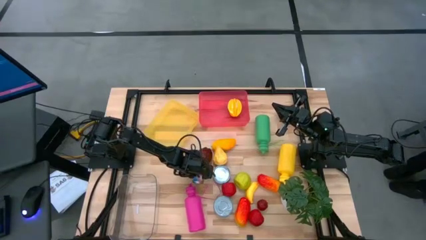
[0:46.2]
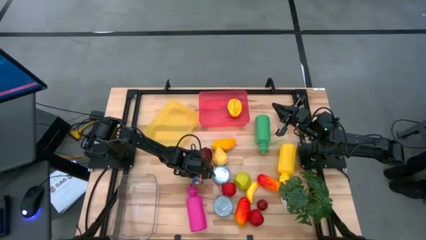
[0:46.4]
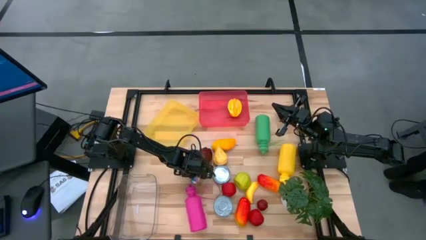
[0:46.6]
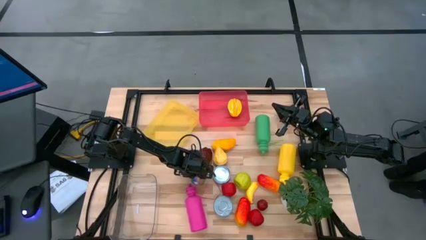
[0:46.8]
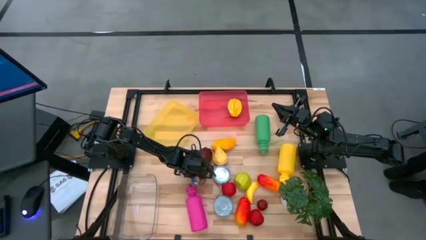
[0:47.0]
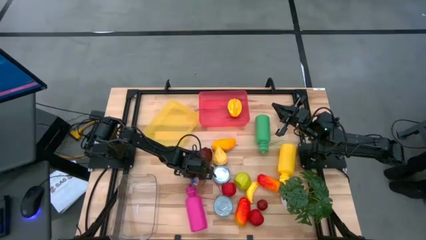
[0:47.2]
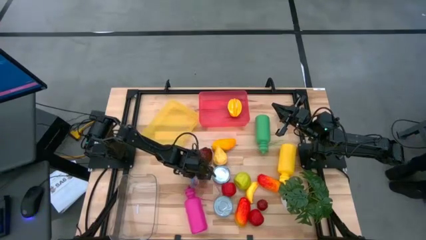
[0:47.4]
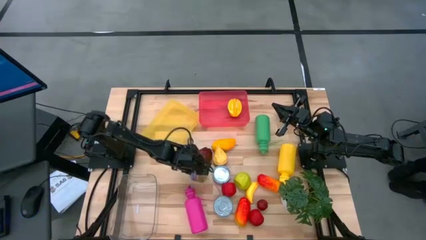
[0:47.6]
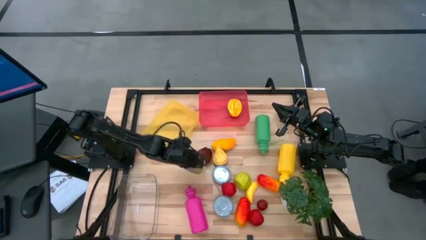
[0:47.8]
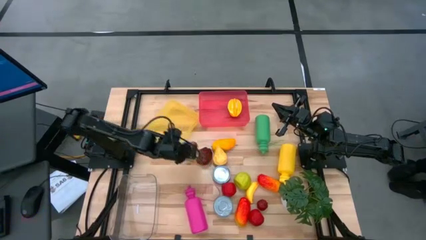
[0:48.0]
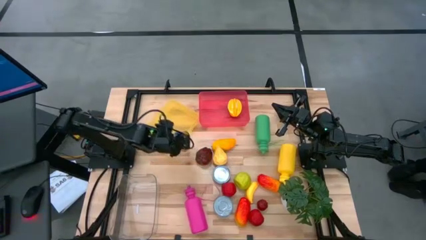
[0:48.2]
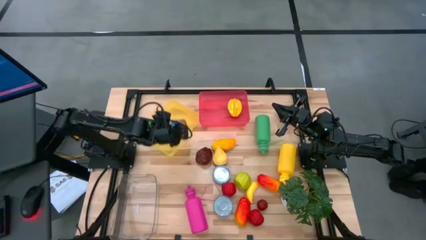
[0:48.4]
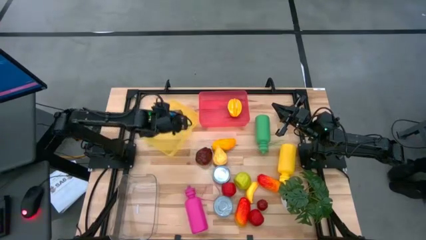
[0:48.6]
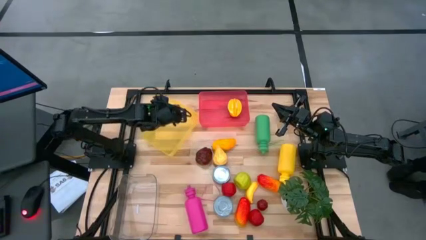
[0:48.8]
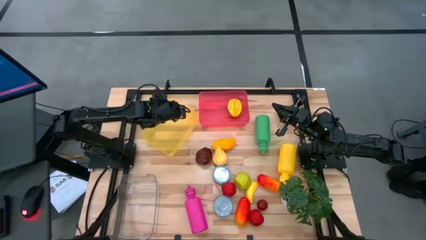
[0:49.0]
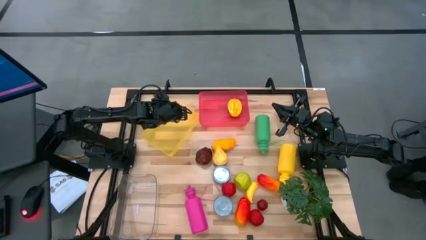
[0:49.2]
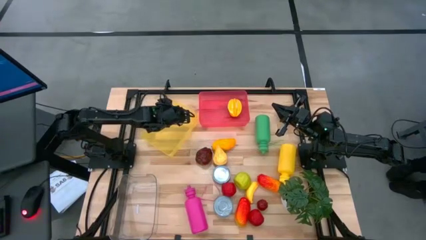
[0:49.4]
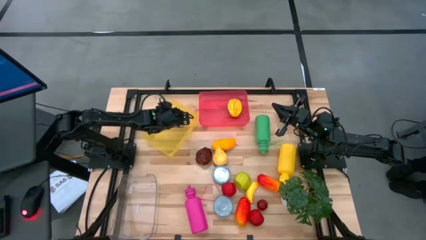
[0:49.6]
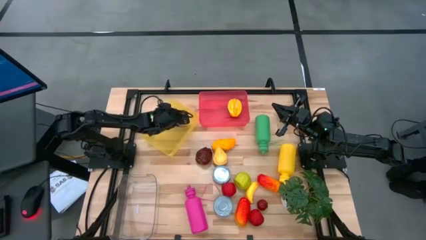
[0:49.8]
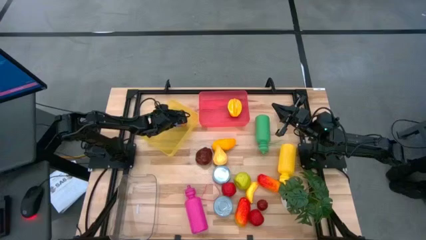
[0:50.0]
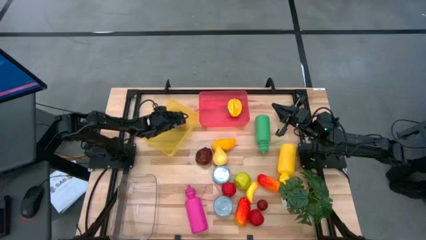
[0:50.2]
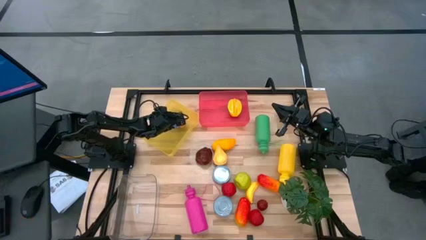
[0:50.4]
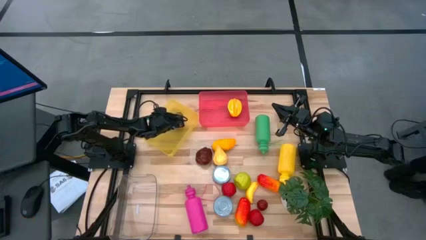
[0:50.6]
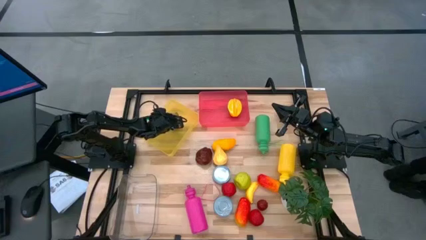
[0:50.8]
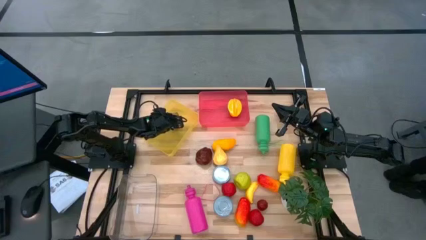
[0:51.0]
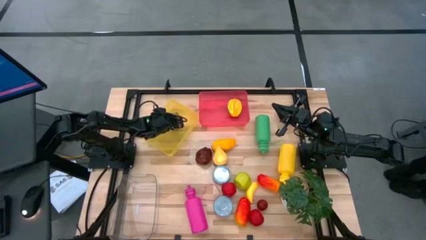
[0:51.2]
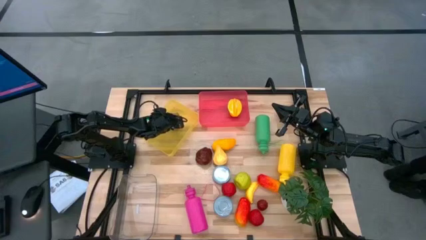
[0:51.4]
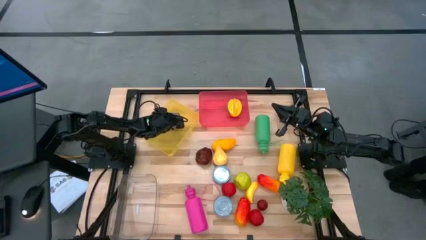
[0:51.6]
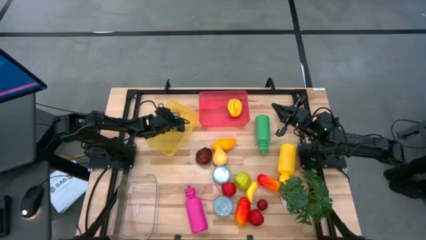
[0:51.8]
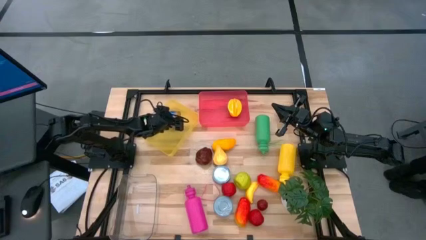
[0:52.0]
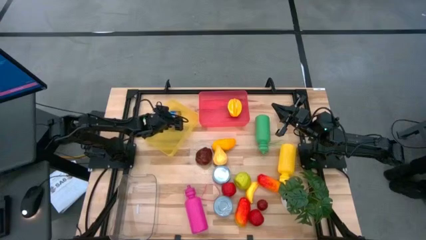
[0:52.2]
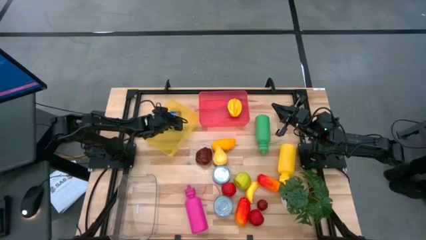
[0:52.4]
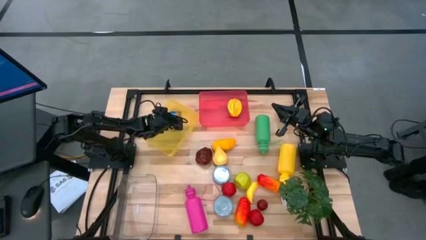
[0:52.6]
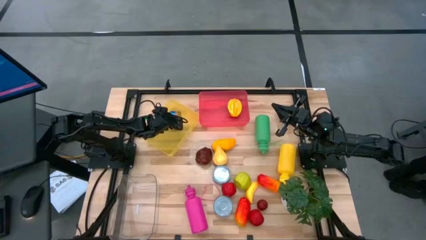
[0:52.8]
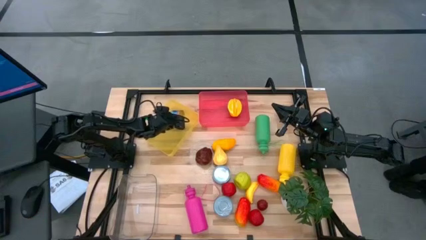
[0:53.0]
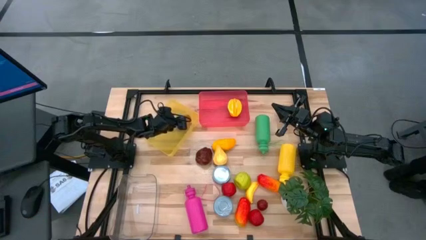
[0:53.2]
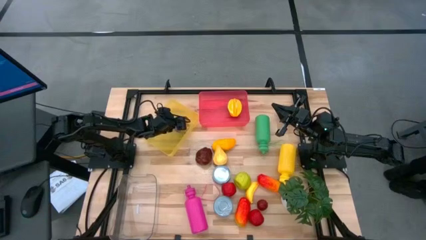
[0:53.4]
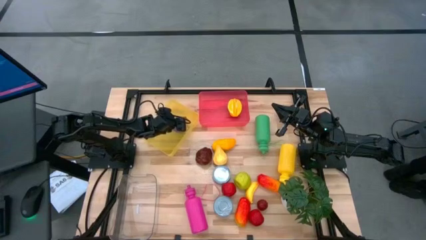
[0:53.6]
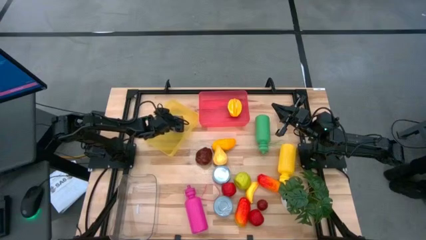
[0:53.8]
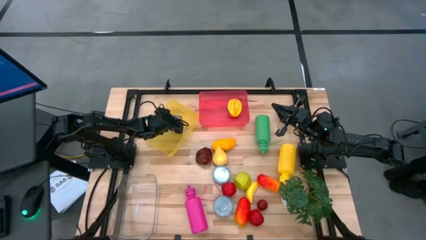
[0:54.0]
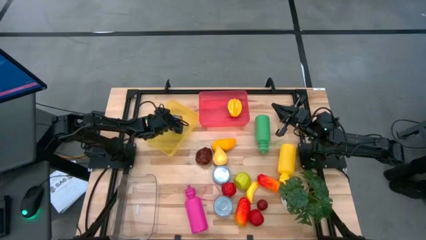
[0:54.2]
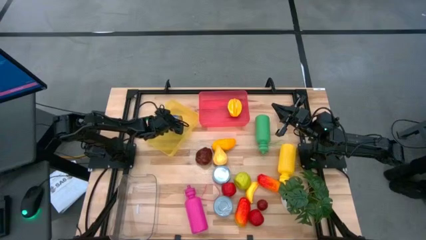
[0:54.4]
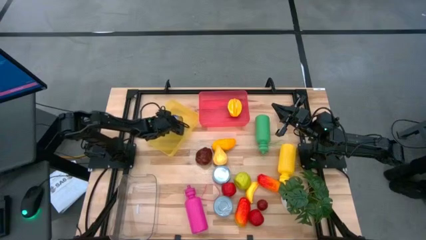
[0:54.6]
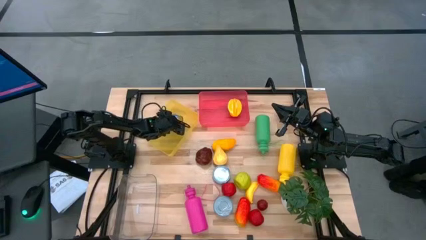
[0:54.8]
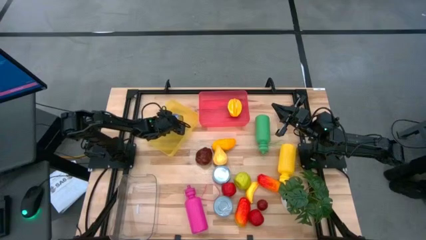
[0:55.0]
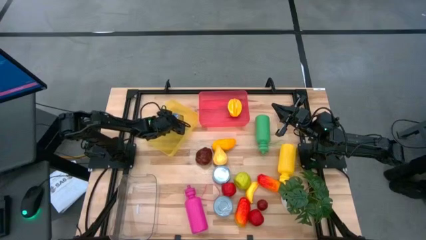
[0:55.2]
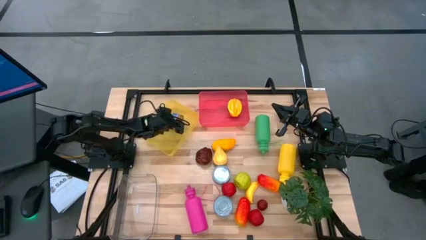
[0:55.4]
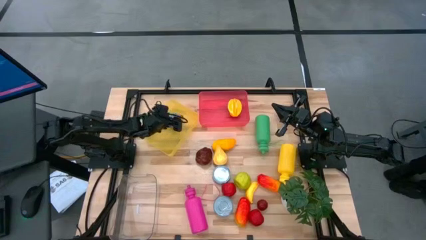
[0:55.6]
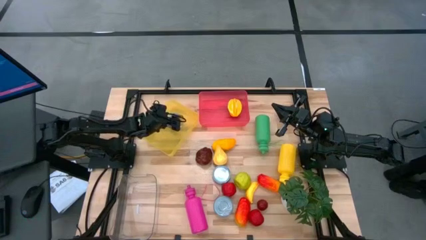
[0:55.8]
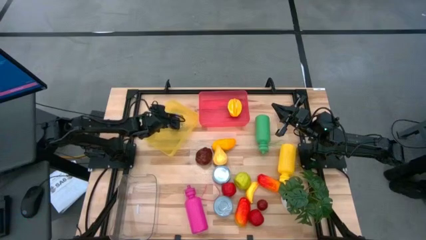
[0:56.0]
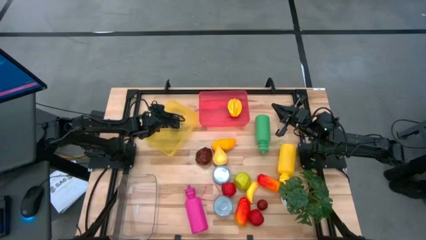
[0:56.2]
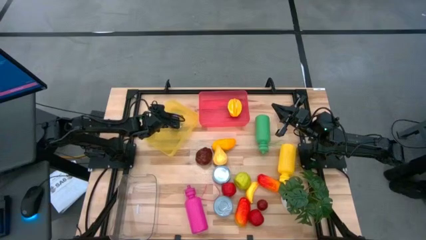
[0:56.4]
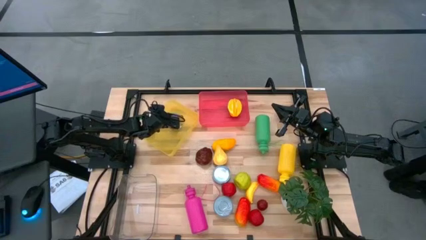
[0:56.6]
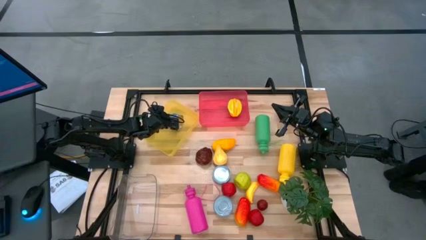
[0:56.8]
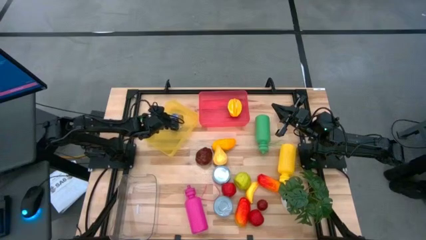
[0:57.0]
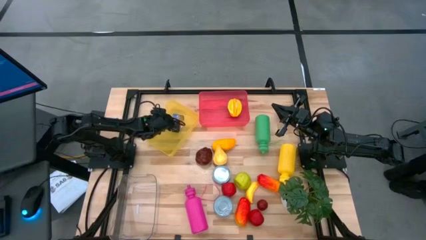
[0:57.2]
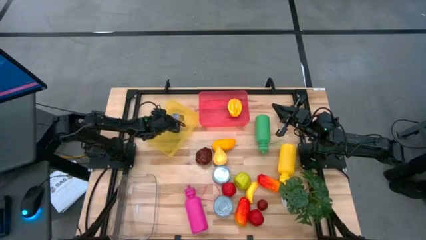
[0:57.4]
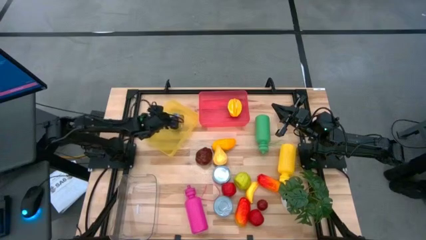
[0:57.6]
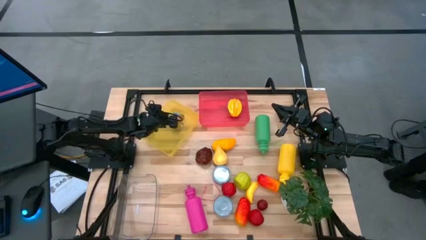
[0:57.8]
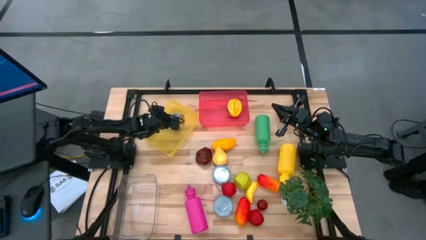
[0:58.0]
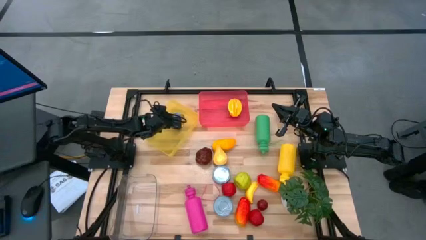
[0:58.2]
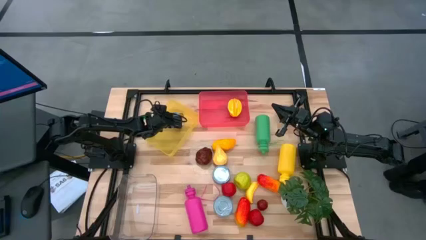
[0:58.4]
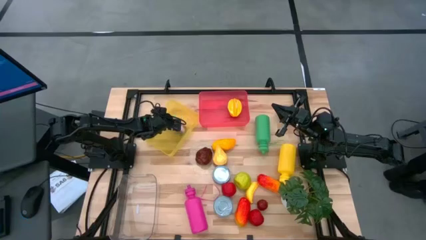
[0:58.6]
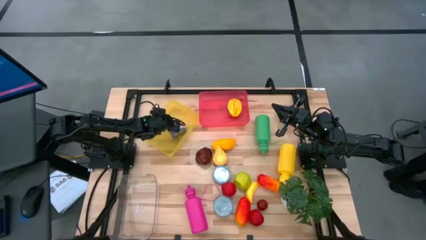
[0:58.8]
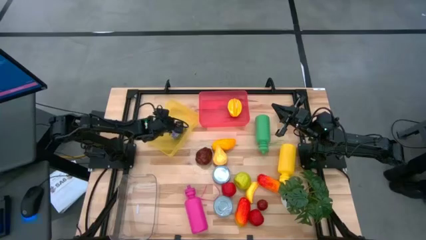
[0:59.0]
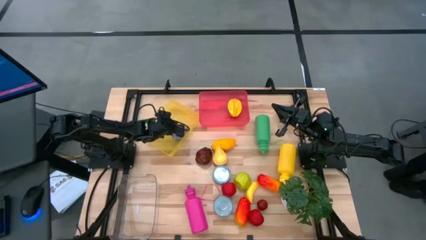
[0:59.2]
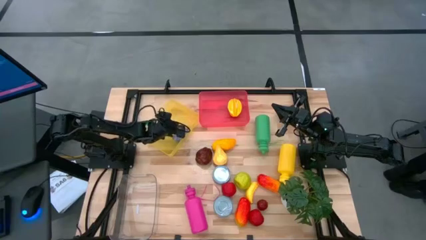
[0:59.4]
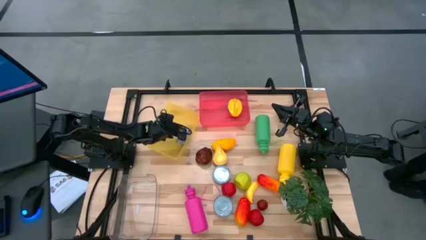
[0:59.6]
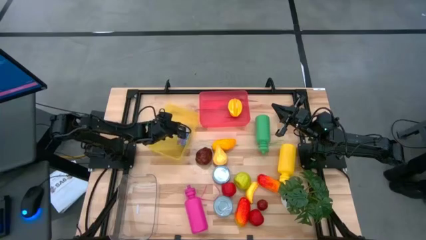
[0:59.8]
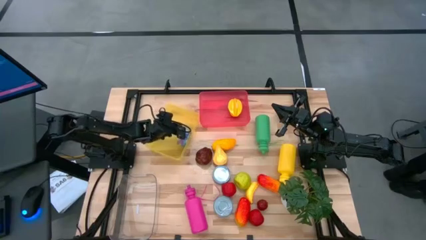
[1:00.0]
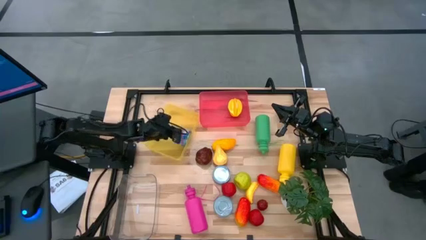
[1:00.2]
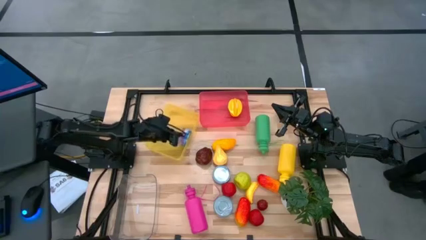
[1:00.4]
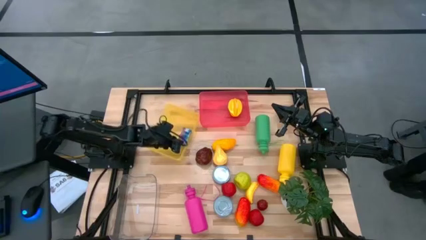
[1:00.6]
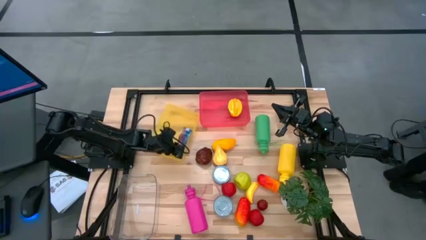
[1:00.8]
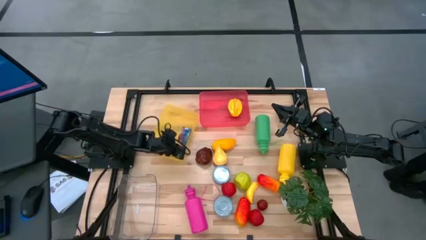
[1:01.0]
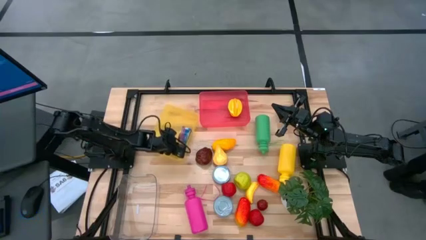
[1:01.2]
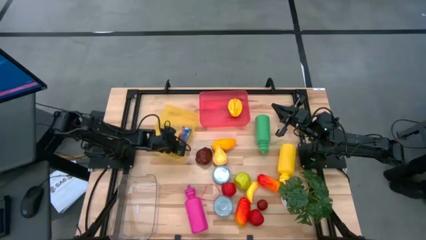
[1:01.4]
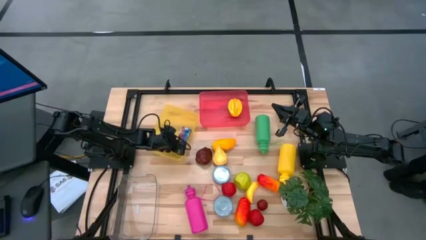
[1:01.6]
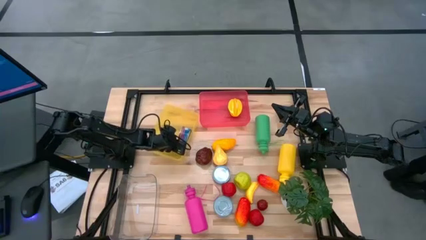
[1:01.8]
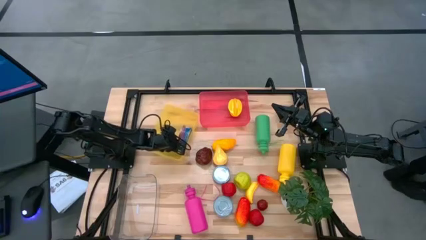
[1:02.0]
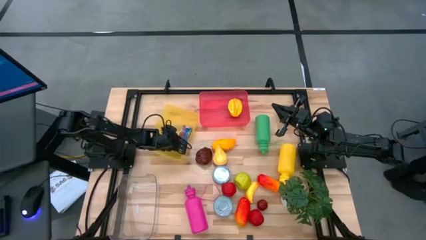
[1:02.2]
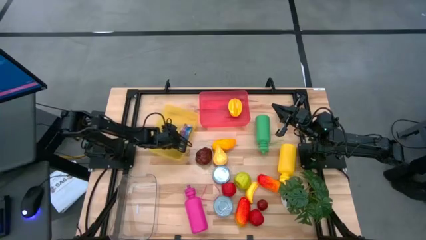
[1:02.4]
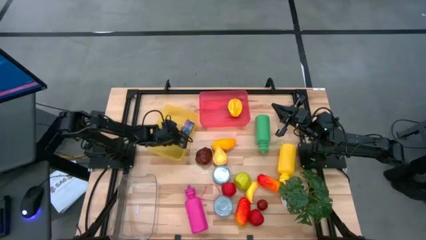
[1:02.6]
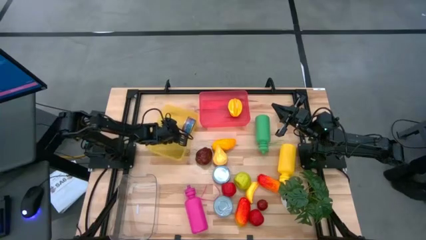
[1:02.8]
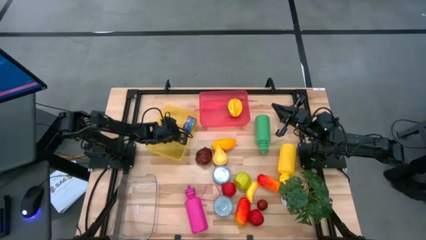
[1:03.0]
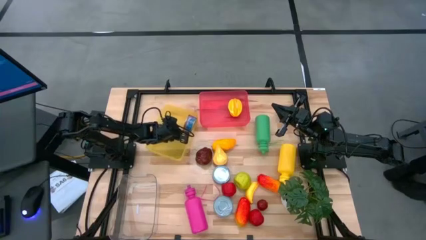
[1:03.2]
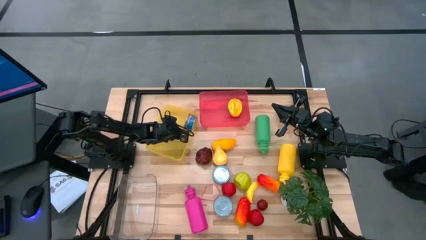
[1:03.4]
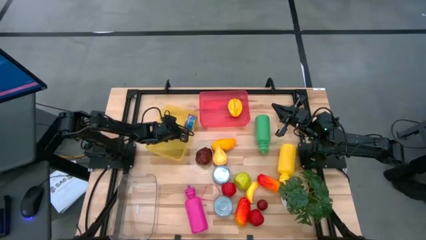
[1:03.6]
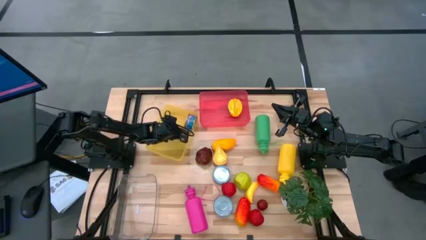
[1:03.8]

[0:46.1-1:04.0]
Task: Pick & Place Food Item
Put the blue tuna can into the yellow bin
